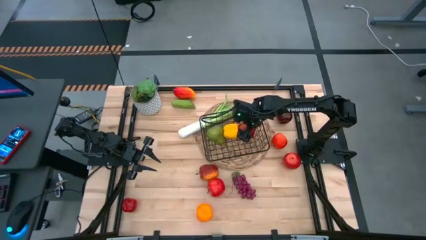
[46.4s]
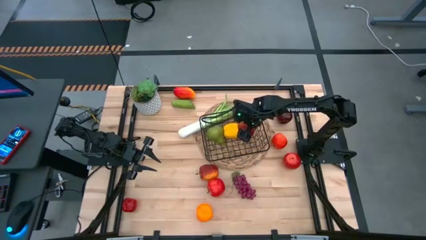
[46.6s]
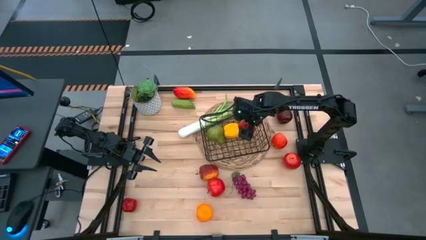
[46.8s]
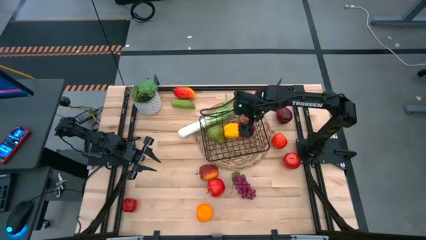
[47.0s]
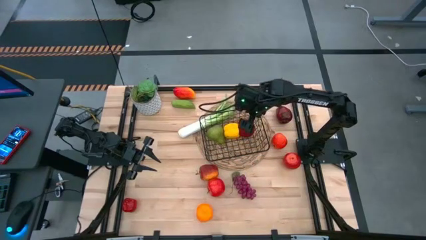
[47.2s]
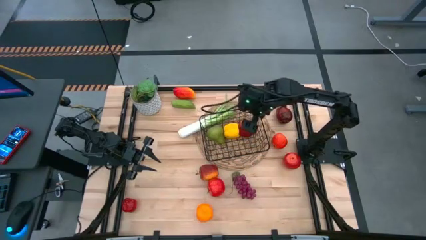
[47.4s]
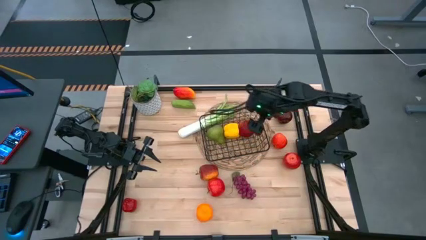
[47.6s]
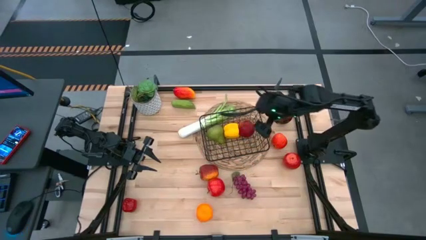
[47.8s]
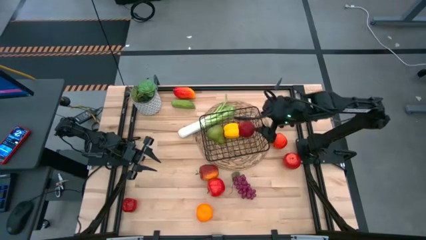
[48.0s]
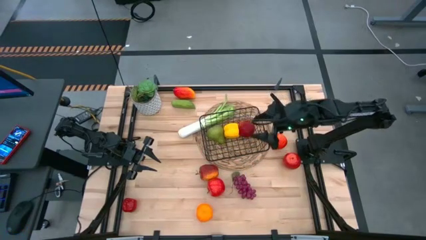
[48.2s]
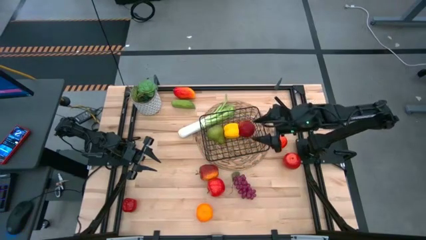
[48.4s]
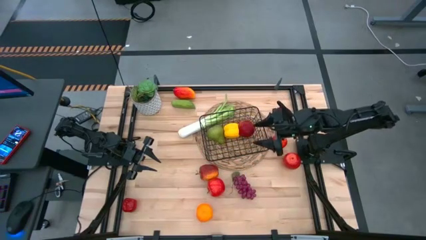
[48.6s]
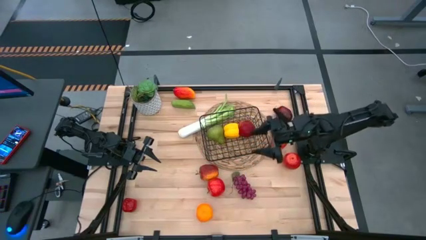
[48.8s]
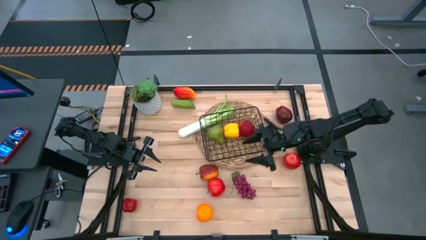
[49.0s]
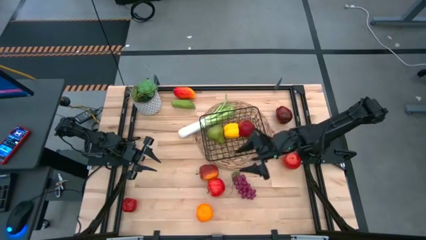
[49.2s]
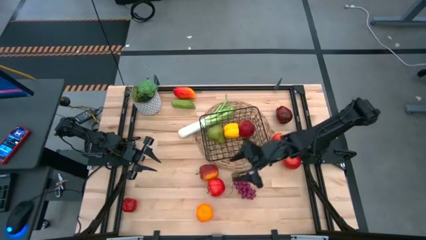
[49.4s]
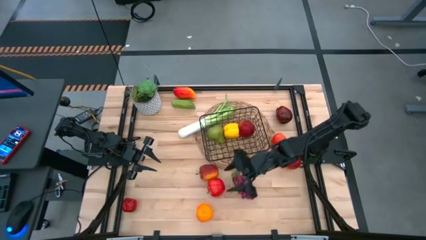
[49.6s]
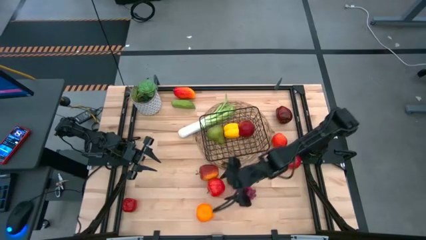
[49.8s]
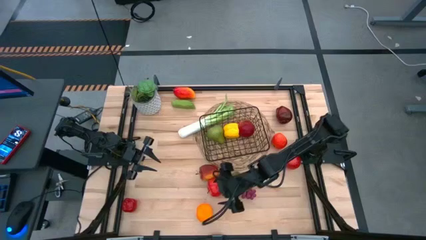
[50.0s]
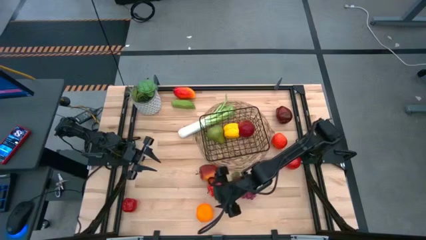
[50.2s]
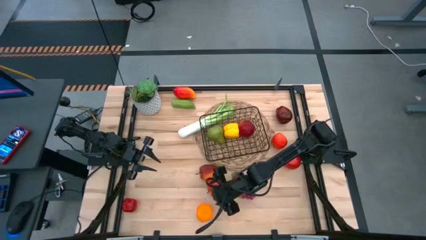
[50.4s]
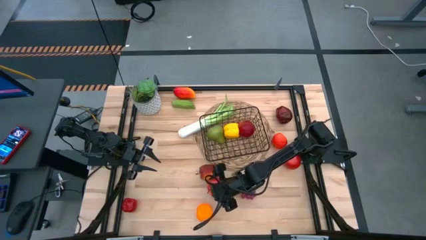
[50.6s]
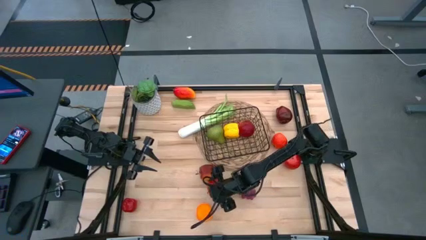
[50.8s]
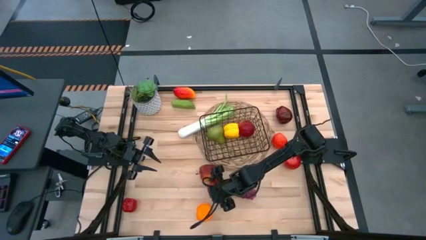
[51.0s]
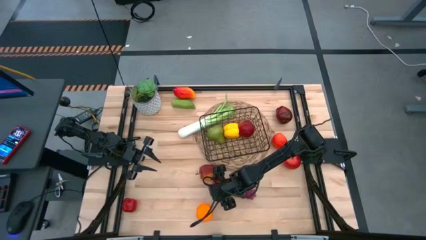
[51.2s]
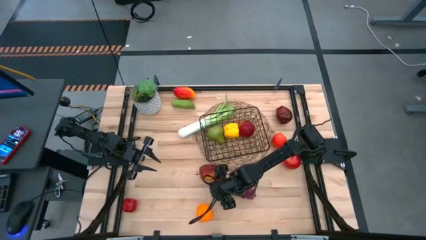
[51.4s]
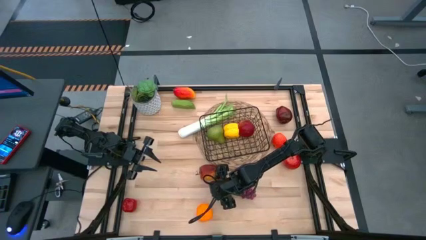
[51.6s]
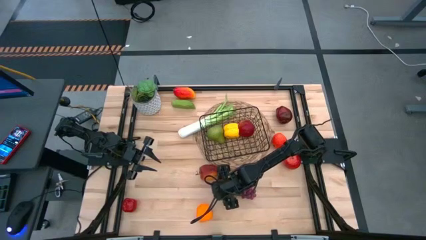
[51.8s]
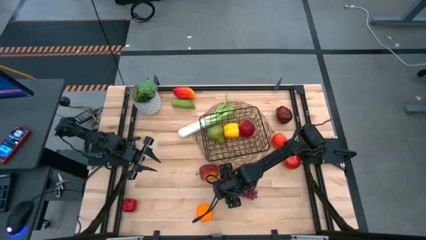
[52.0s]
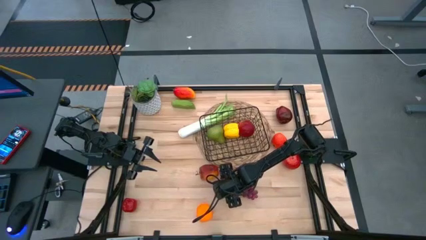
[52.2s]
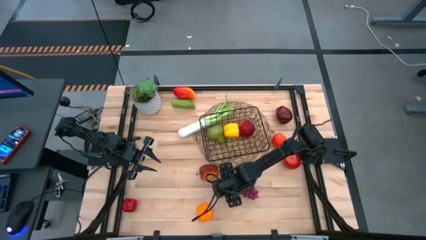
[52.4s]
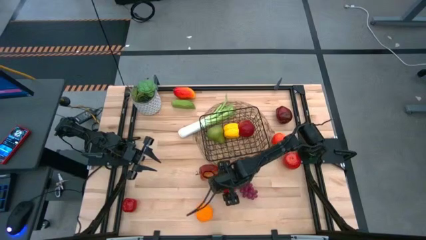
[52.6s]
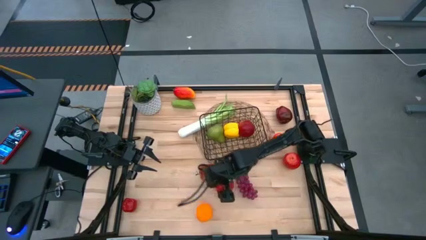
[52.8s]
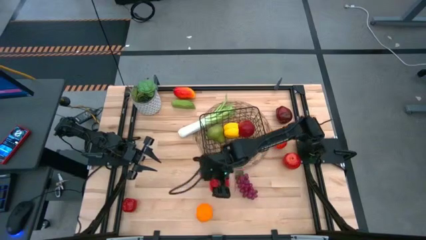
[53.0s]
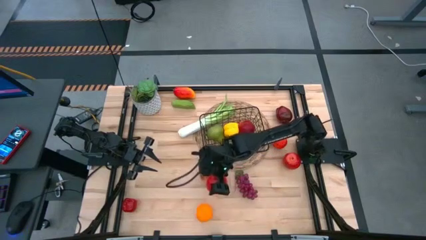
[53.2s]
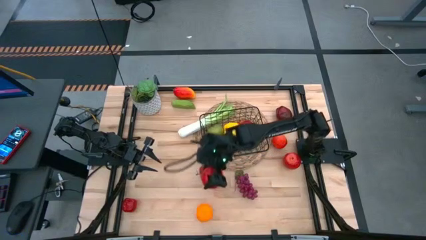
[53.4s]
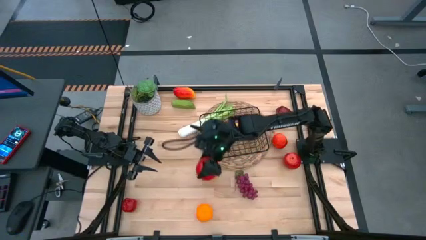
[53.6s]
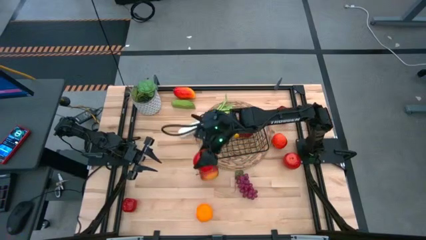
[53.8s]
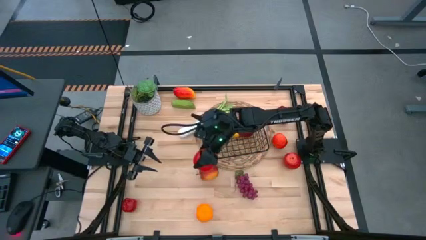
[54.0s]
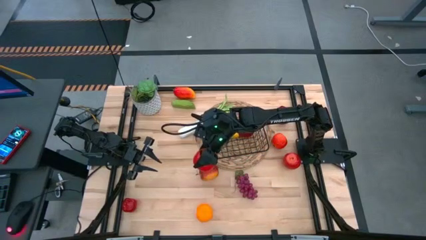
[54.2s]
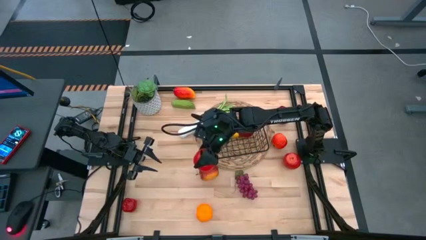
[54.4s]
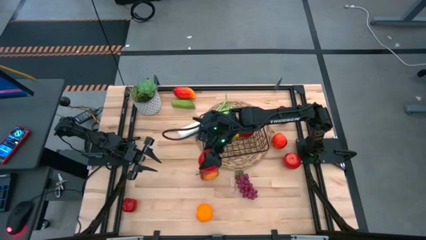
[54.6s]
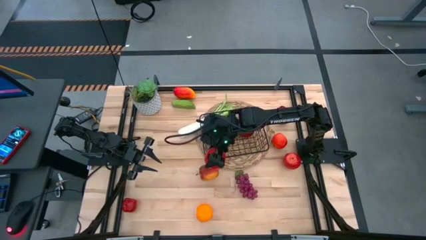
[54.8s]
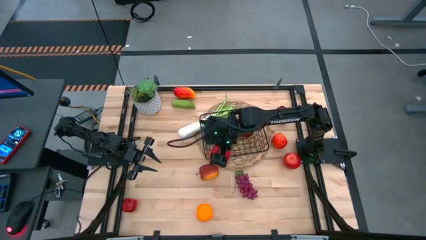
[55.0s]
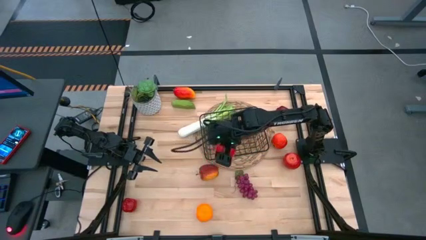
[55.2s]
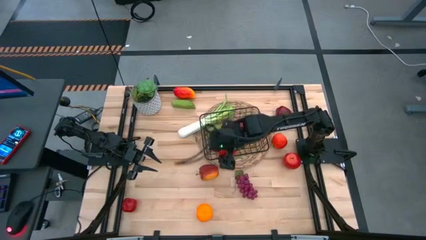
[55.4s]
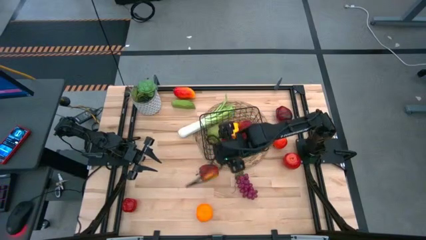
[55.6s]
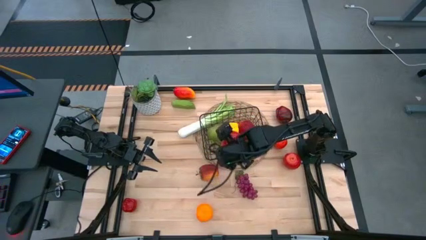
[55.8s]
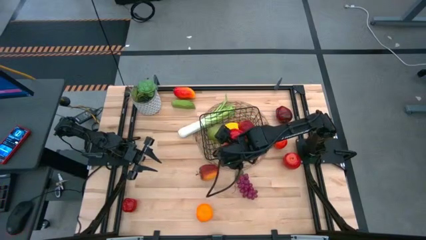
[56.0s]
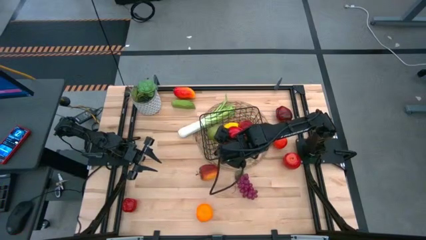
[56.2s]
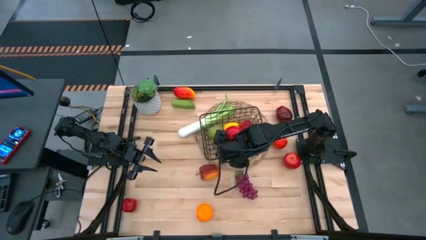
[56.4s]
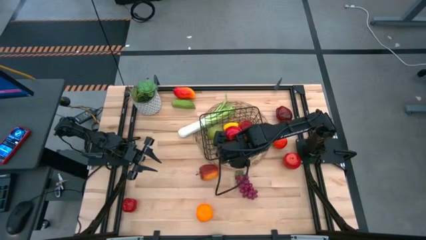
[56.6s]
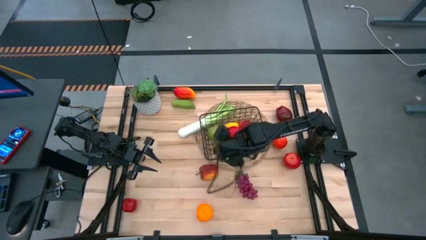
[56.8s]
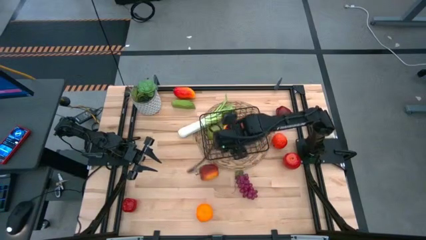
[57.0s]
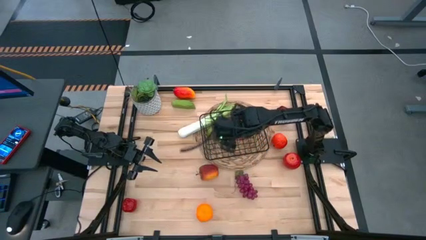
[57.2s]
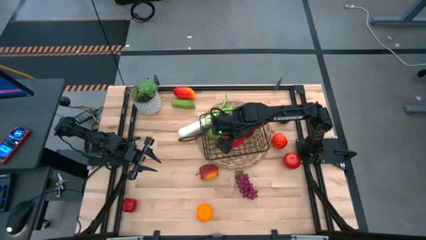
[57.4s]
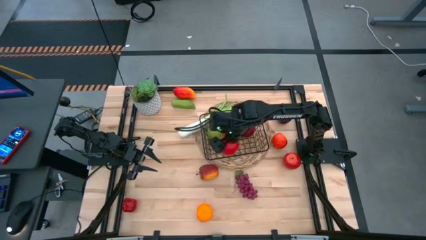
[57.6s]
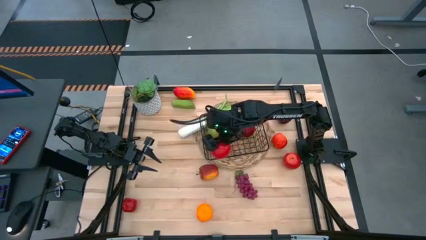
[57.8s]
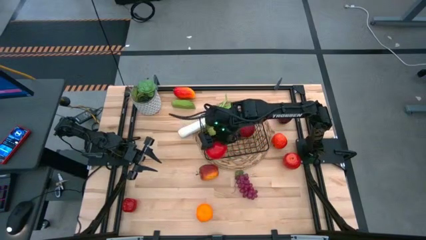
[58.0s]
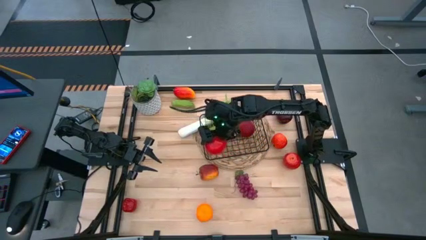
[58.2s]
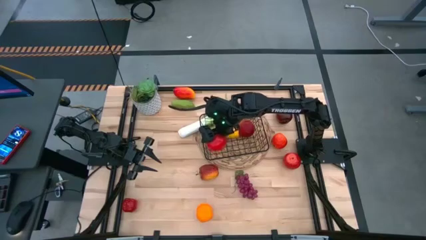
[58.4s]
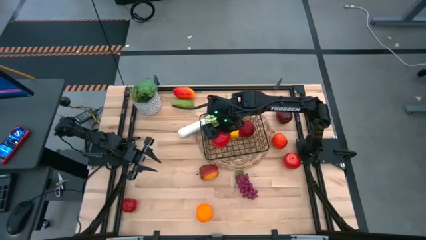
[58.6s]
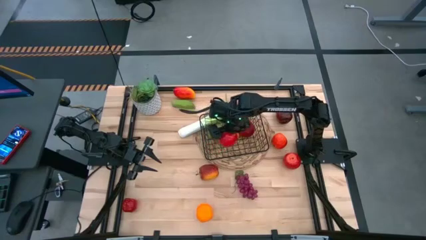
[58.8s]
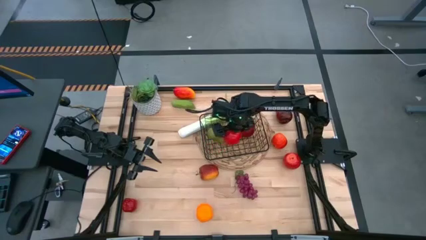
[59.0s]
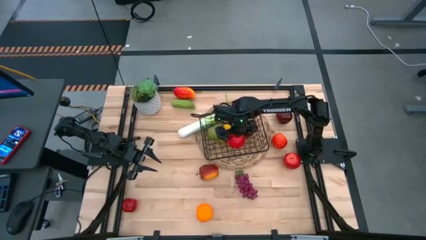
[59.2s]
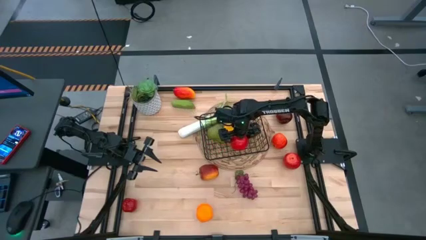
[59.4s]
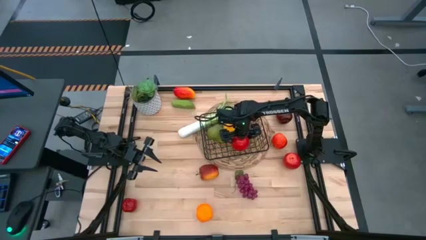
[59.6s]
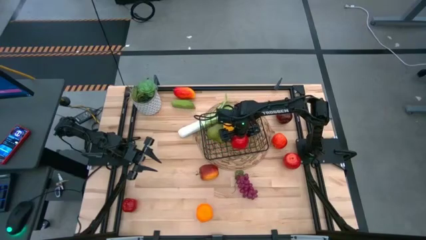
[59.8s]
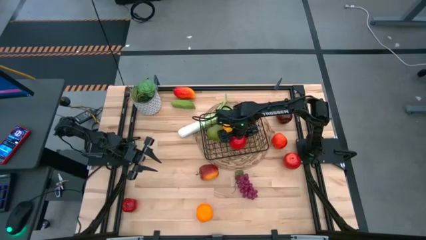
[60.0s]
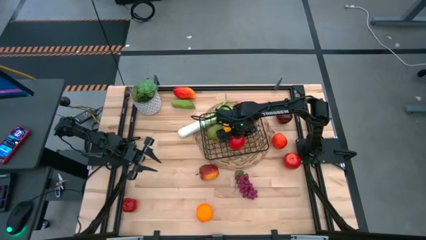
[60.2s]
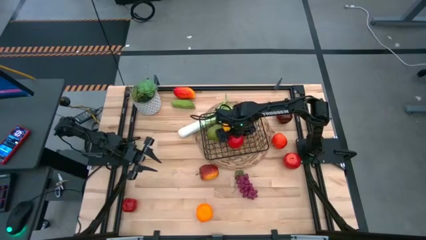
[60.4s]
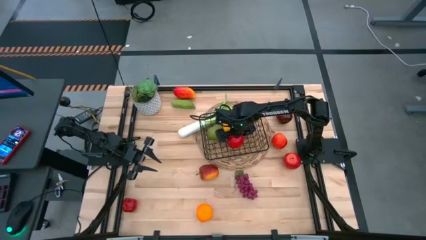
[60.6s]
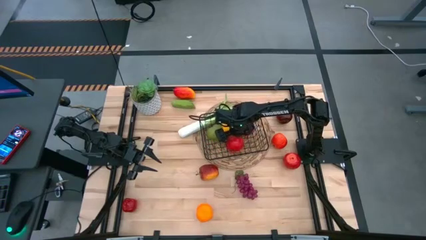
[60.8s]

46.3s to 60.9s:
Task: Build produce basket
Put the apple into the wire basket

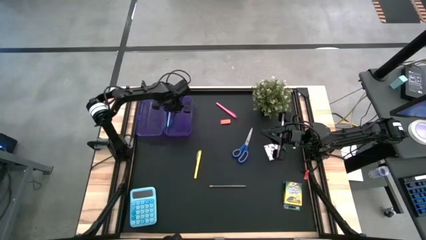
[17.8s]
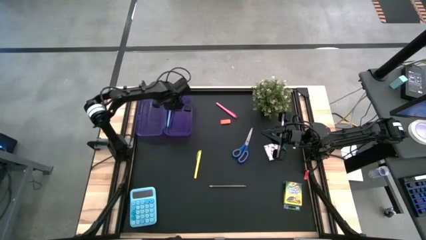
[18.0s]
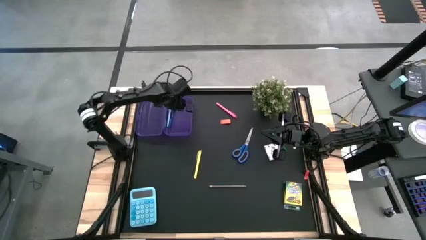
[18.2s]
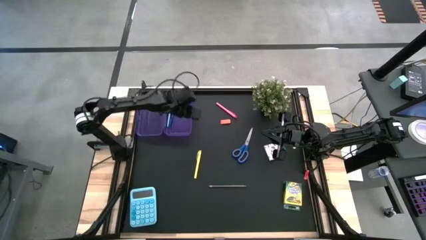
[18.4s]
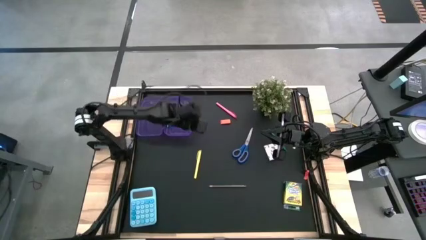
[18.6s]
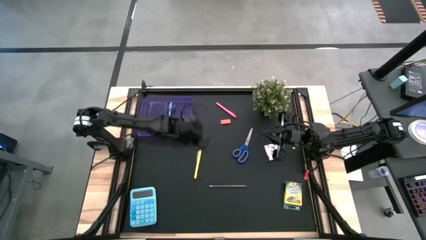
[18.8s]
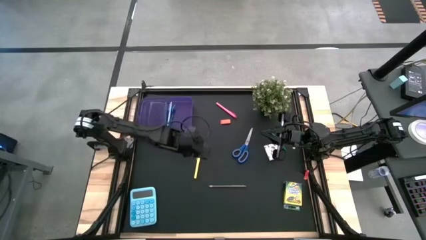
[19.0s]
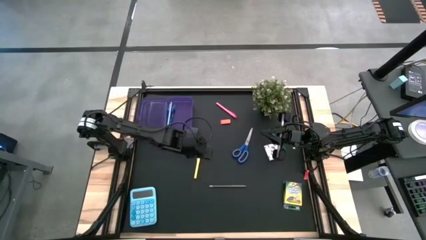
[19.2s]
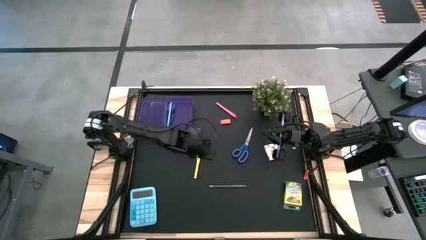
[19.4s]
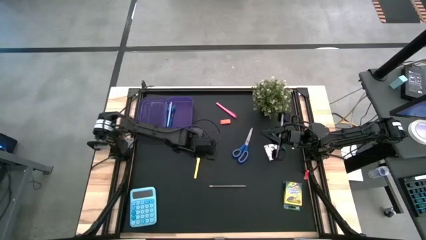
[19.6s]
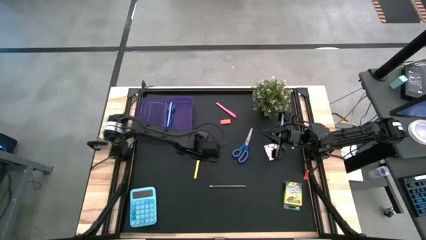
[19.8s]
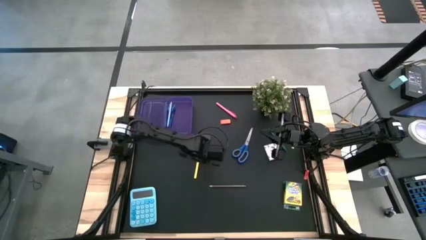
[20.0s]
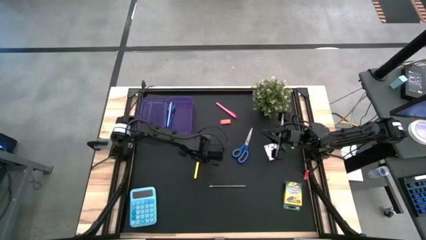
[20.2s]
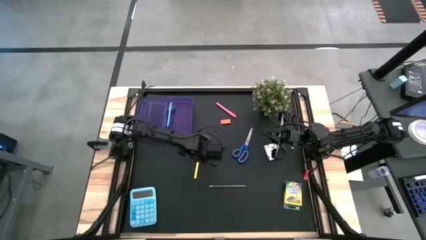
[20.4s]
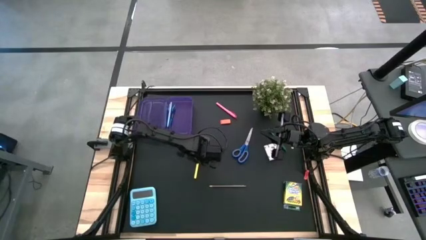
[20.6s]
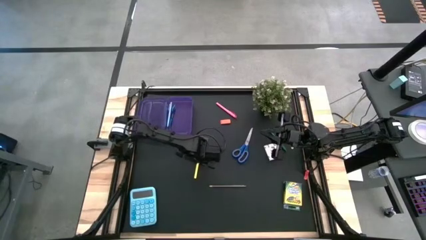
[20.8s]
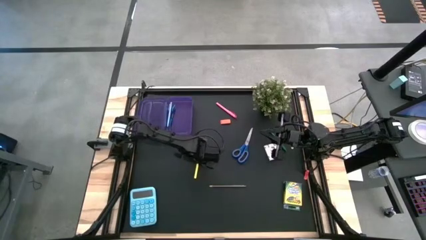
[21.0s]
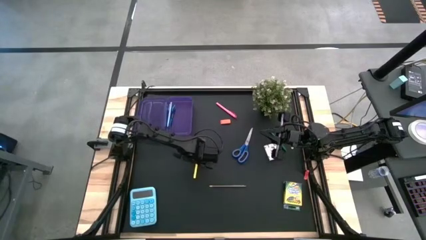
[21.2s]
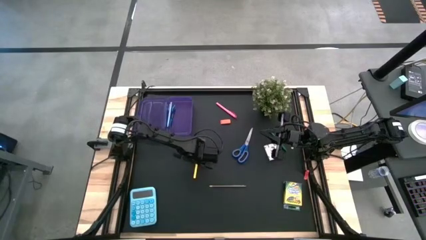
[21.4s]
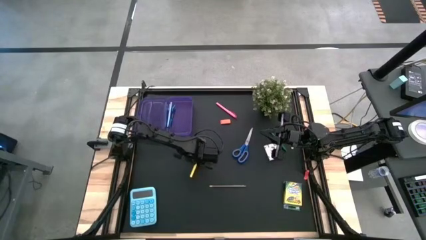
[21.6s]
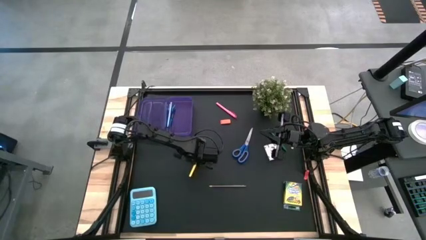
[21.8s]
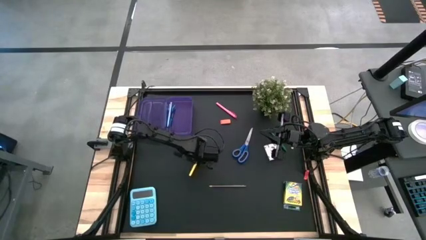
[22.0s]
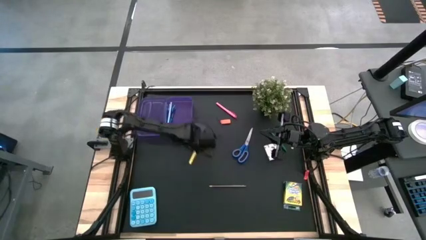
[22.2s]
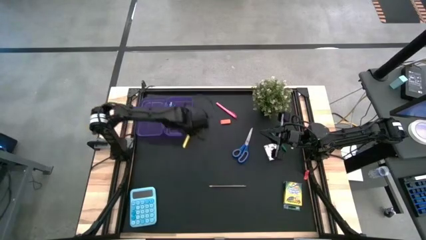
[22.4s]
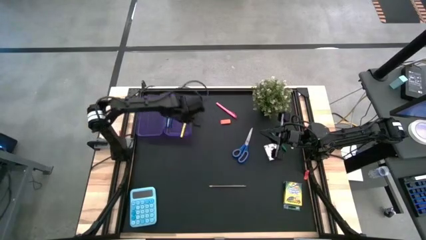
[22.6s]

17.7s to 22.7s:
Task: Pack school essentials
Put the yellow pen into the purple box
